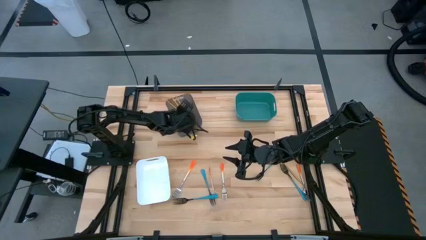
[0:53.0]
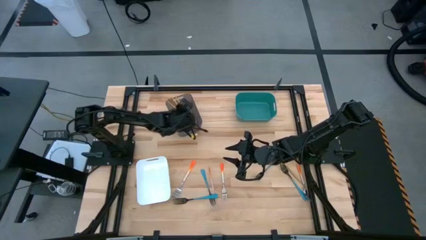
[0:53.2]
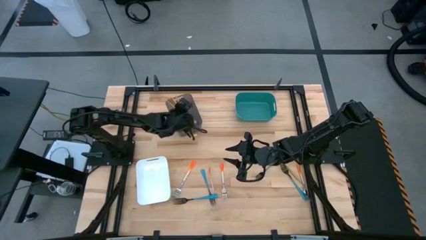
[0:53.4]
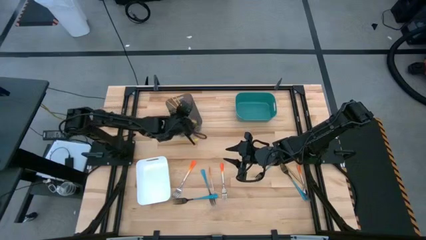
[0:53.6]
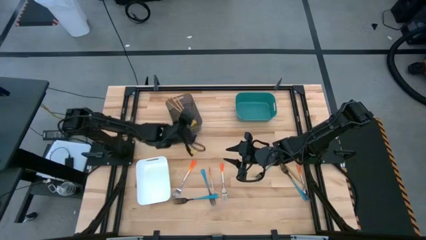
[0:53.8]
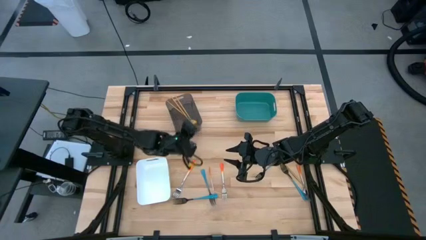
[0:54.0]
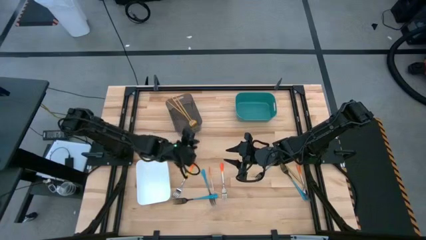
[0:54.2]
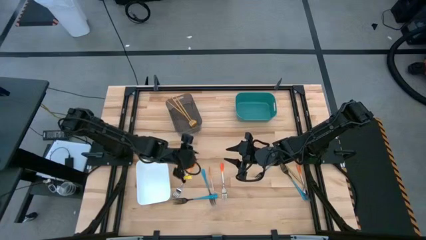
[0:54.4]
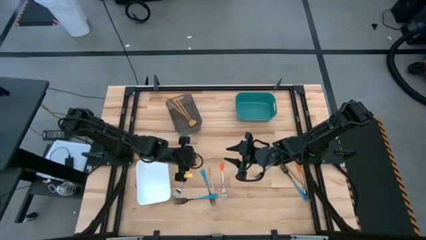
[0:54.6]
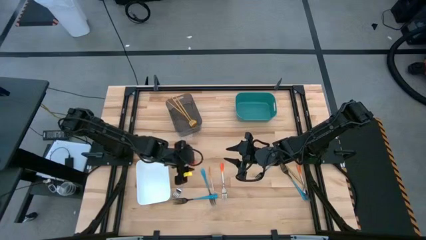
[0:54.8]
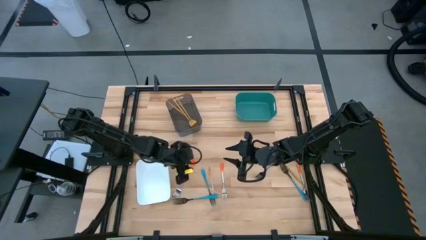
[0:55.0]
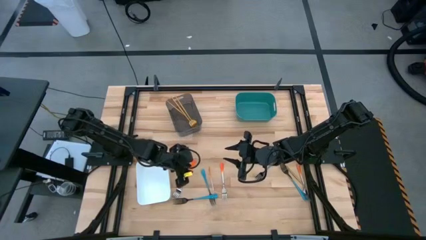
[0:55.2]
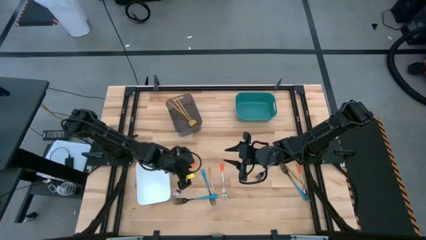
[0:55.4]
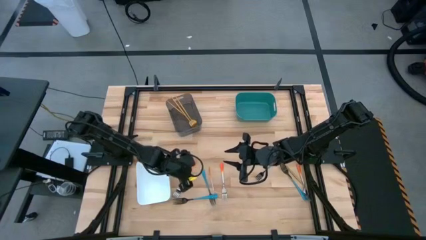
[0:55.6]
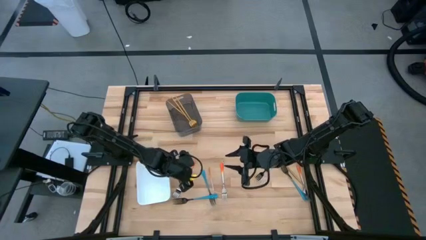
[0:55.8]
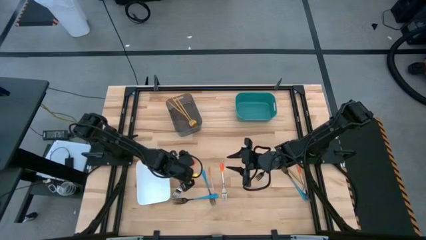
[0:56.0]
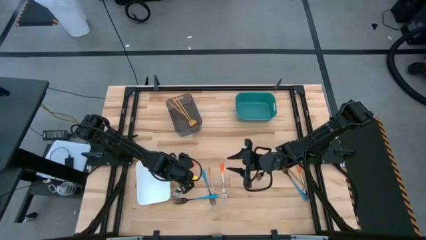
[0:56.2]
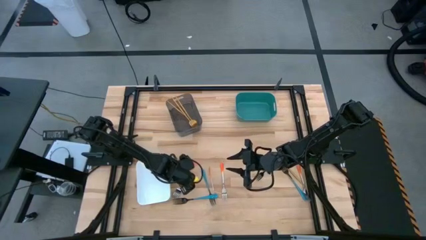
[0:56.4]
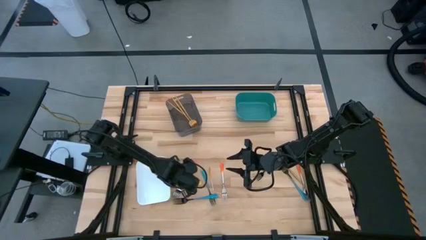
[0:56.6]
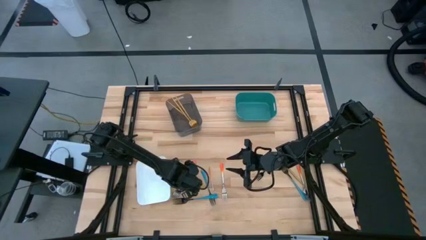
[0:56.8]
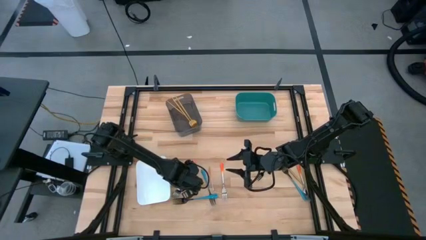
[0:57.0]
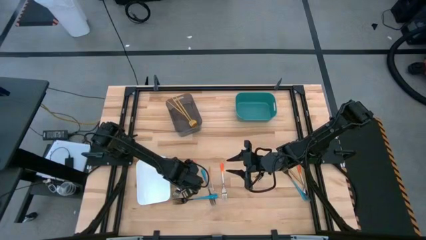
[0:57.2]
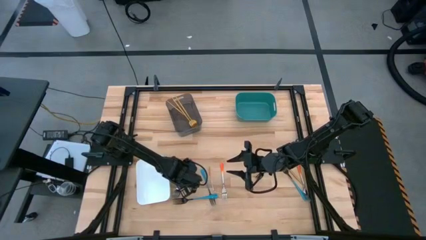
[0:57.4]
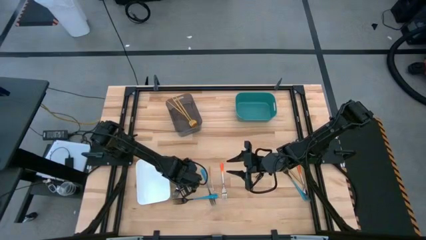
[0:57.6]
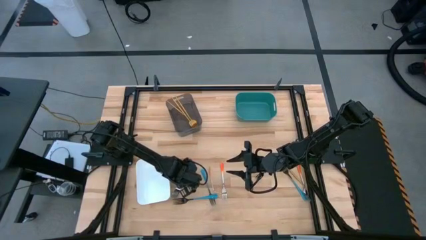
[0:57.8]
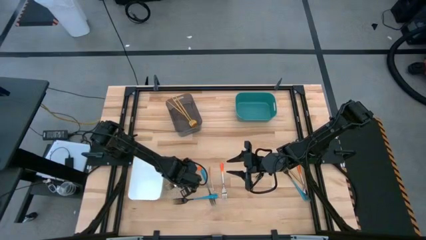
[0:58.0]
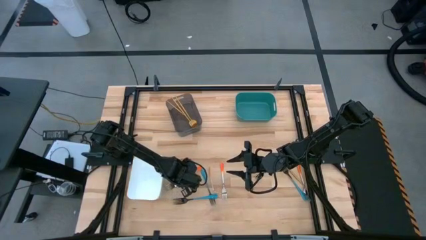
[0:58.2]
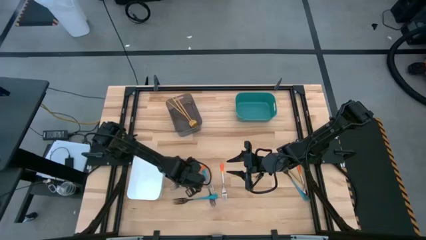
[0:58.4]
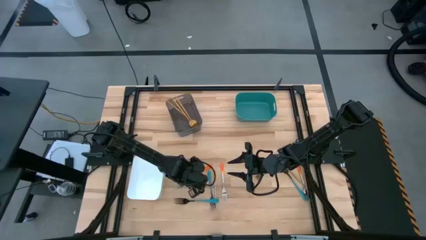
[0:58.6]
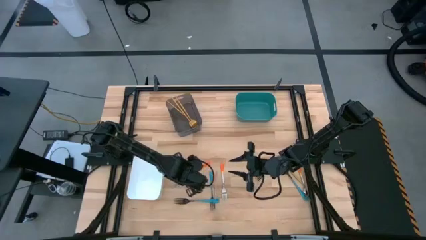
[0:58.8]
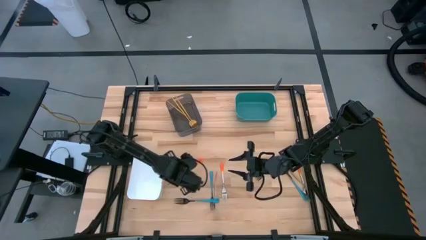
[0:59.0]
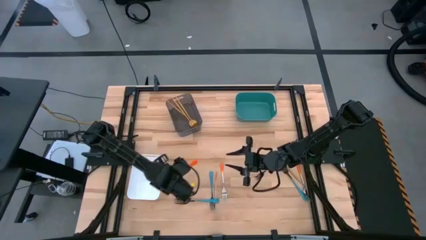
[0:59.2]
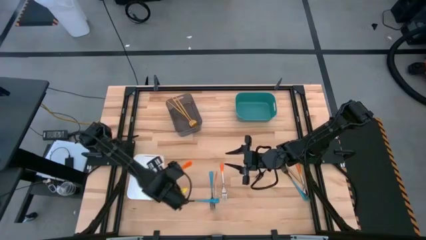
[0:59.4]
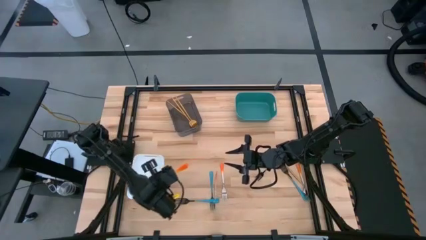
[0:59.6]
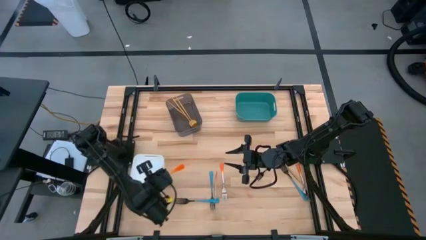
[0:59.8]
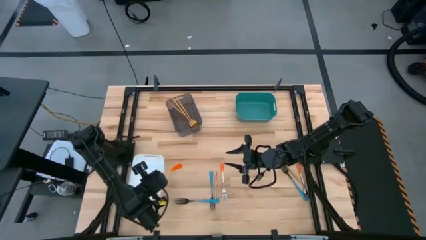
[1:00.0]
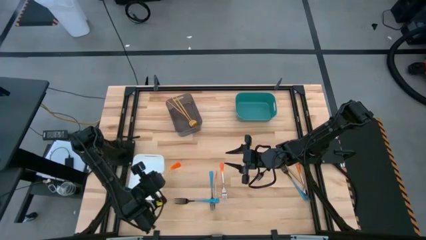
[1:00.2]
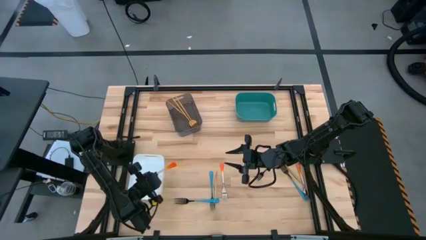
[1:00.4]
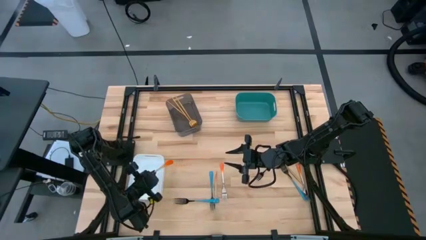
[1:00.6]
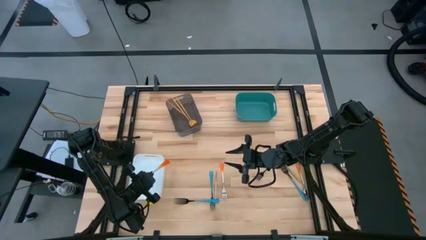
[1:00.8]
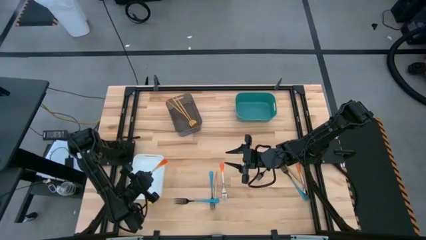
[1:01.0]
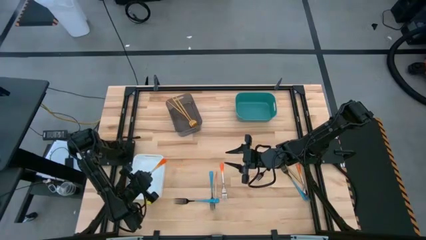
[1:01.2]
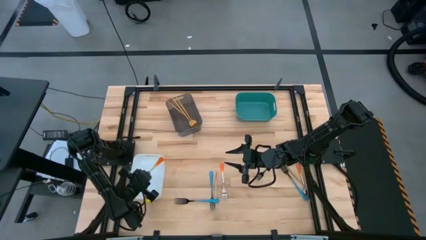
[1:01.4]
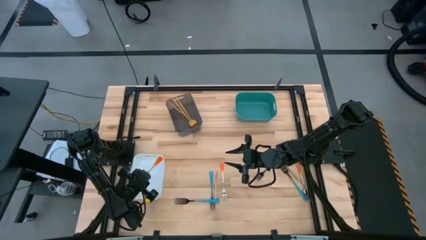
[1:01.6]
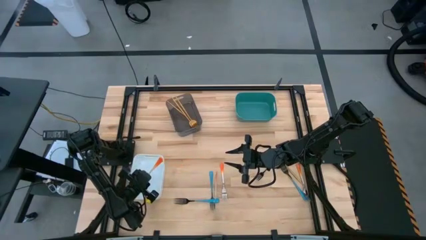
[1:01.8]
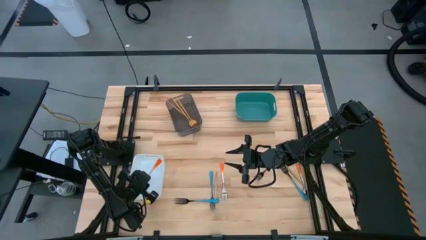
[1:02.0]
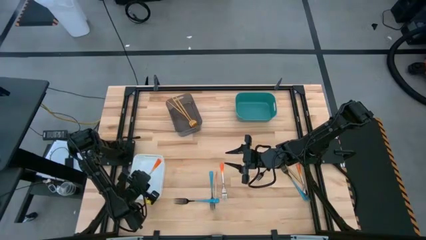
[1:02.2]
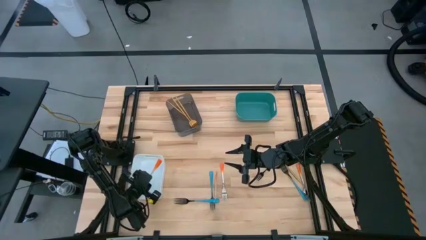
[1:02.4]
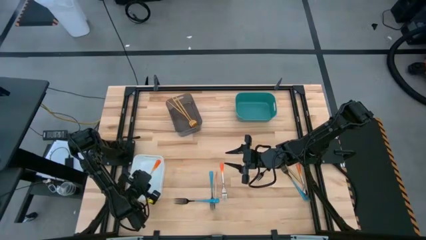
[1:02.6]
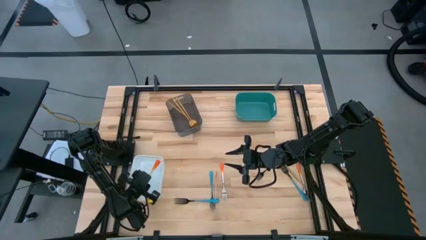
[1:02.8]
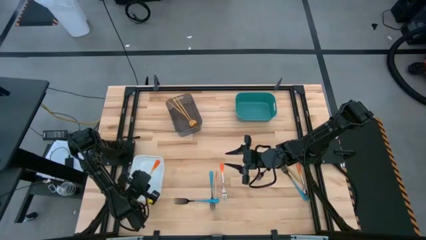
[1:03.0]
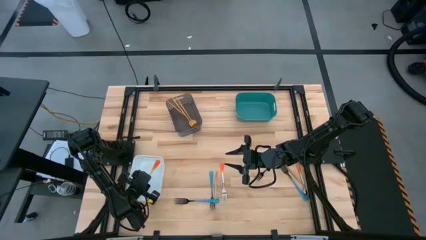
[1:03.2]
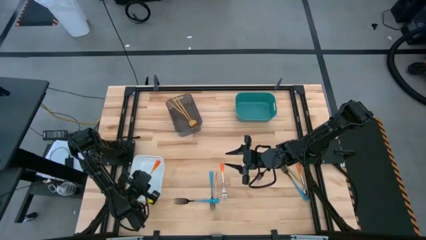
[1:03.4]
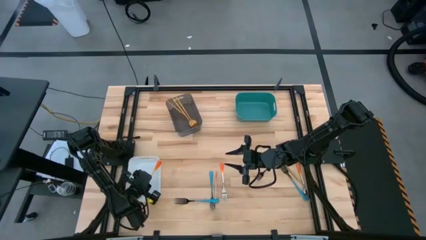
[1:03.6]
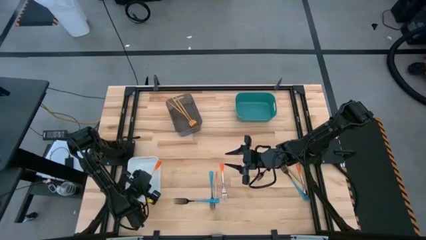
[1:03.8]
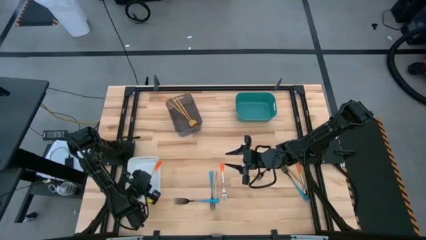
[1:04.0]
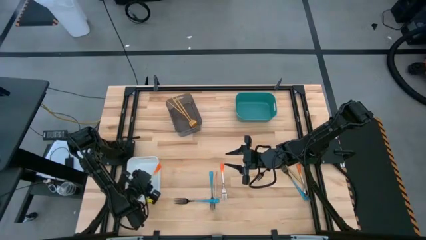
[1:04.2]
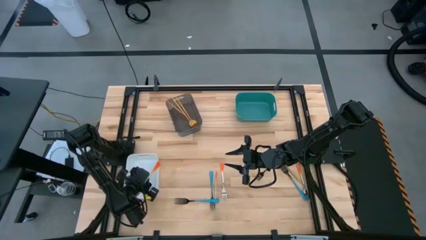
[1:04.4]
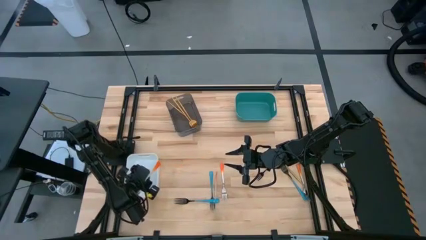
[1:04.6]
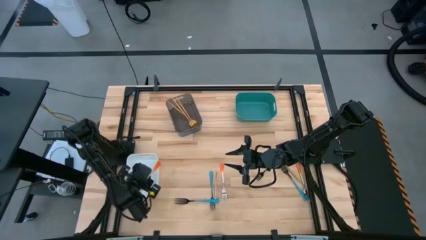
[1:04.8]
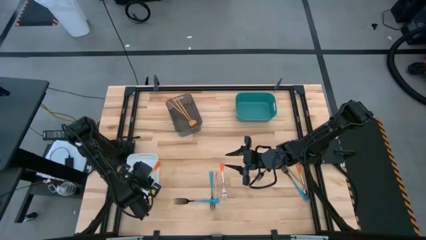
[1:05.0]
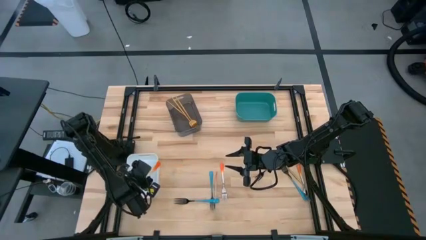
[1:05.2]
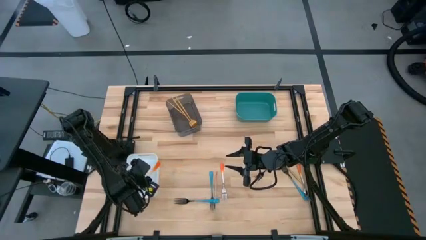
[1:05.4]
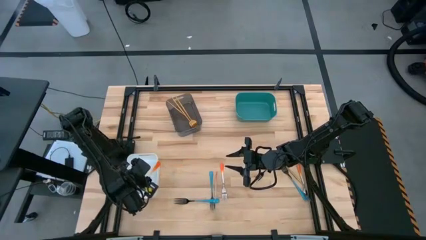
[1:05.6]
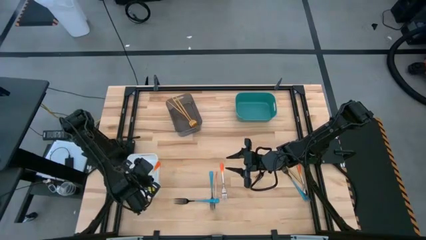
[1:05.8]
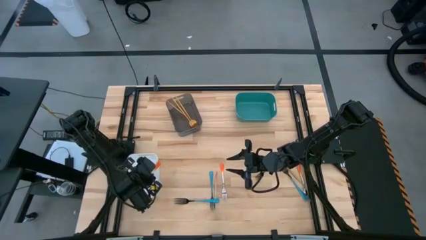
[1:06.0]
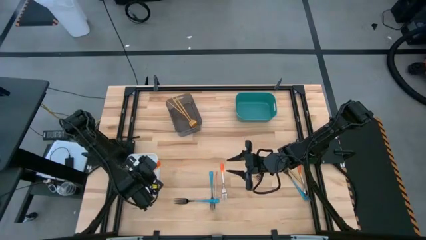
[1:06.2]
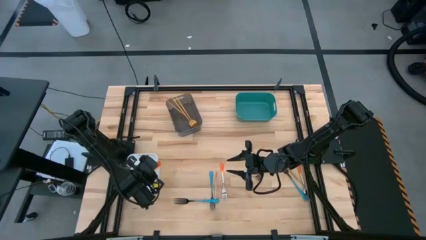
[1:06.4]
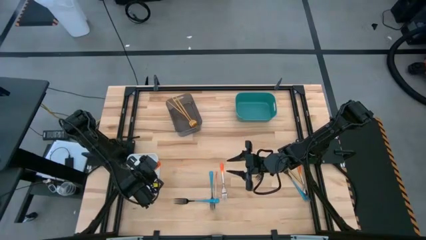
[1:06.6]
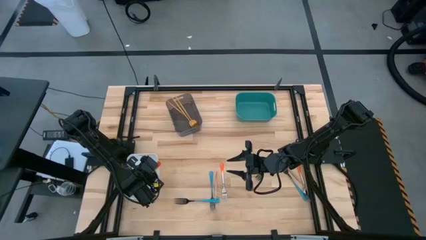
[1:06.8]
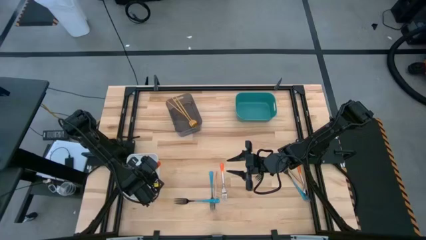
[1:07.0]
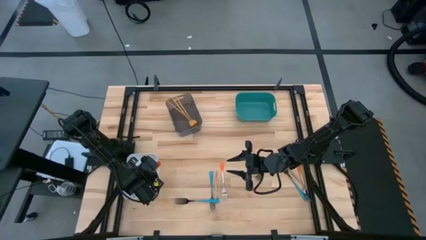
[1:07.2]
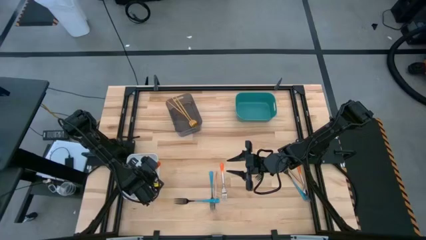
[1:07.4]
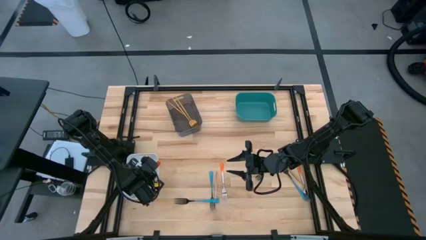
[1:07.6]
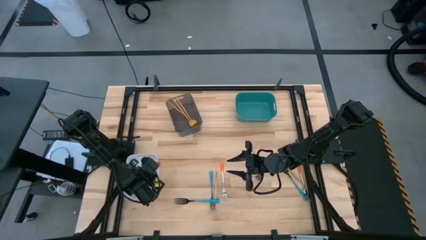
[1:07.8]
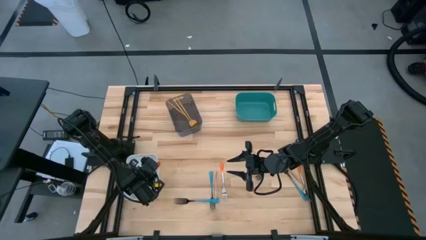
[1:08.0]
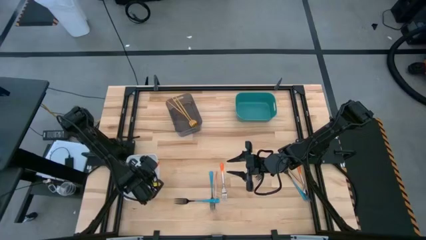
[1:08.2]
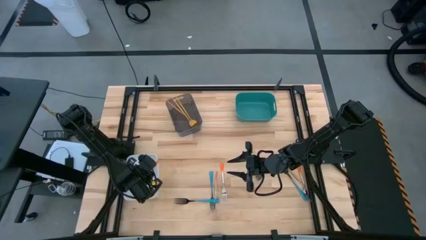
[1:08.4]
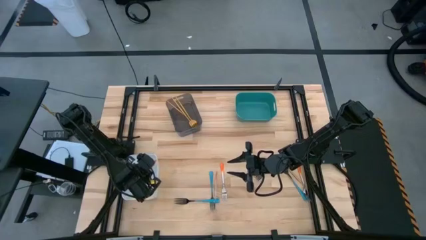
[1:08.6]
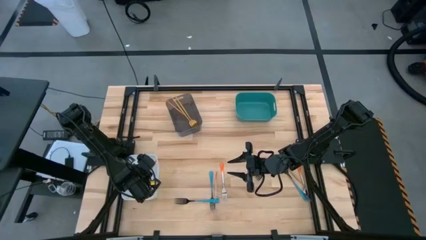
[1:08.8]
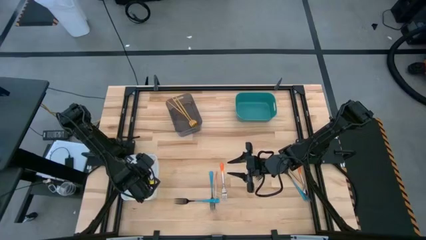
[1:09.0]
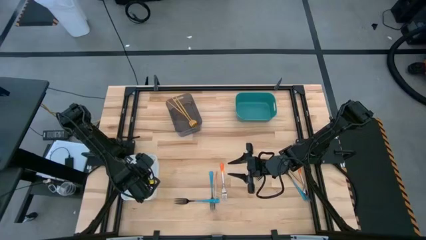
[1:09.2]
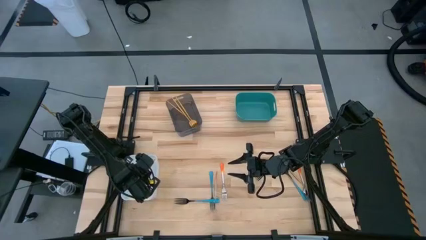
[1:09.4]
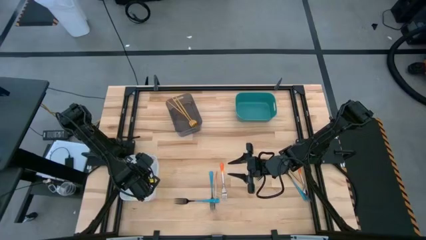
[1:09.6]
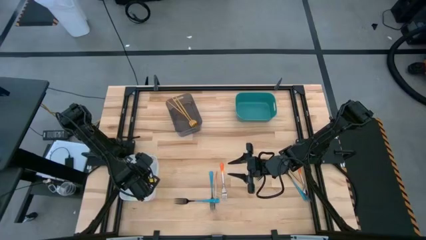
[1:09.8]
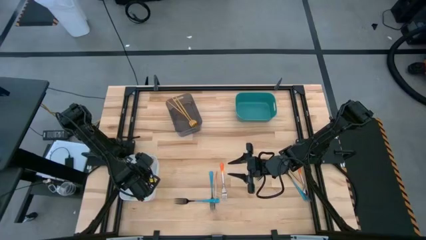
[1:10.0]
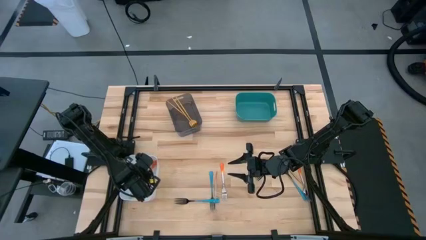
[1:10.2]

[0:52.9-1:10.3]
Task: Sort silverware by color (type)
Put the orange fork into the white bin
